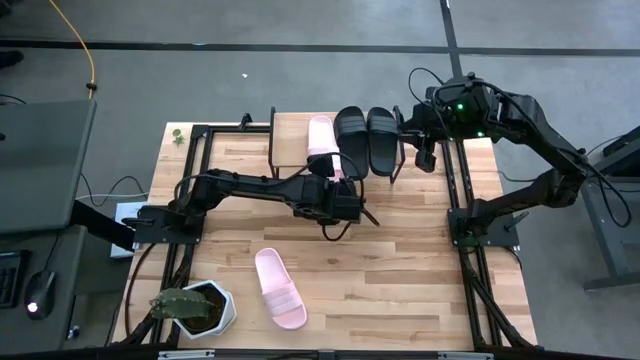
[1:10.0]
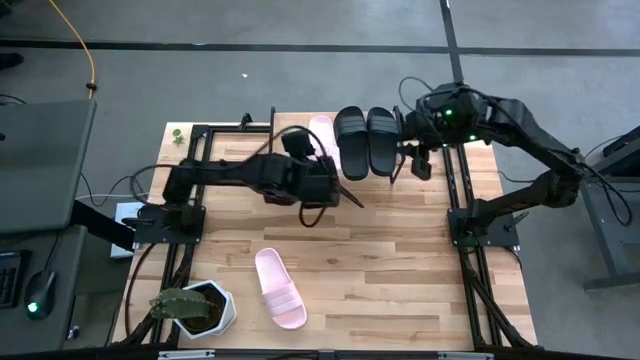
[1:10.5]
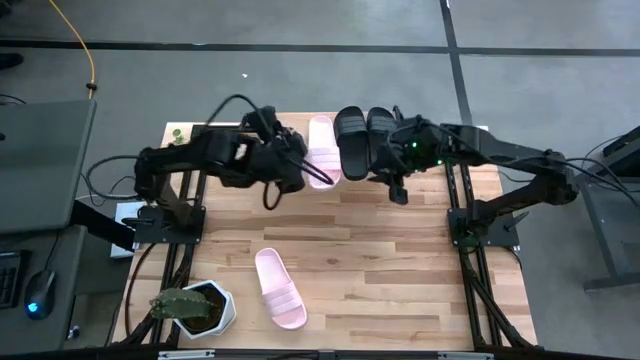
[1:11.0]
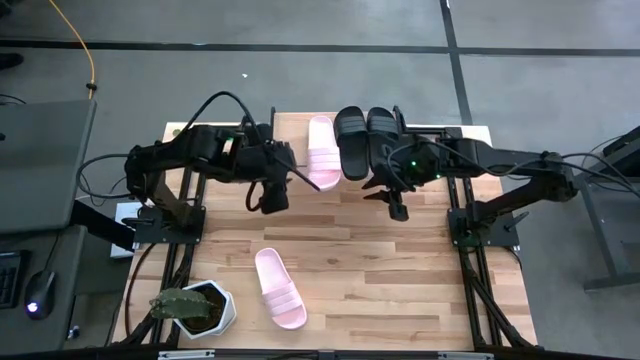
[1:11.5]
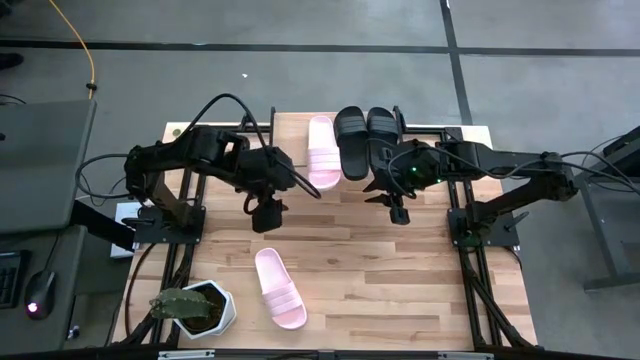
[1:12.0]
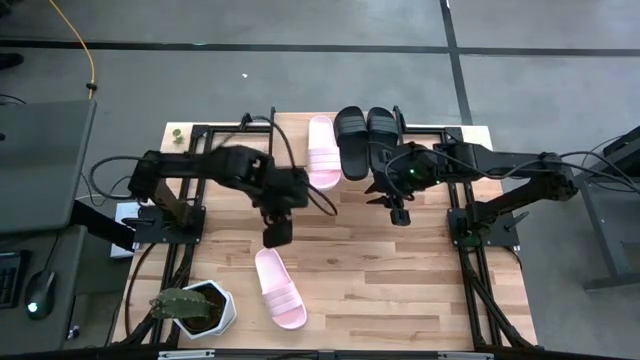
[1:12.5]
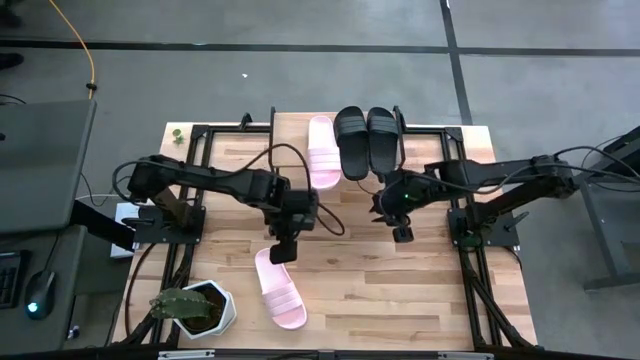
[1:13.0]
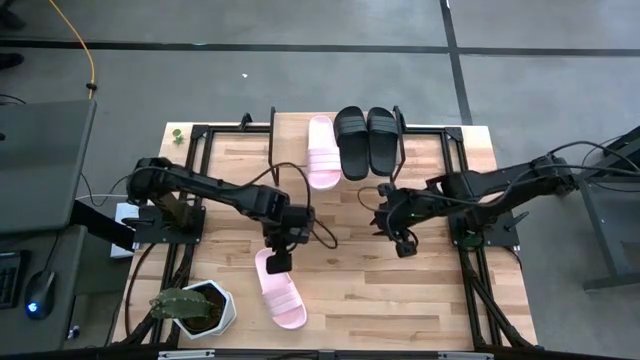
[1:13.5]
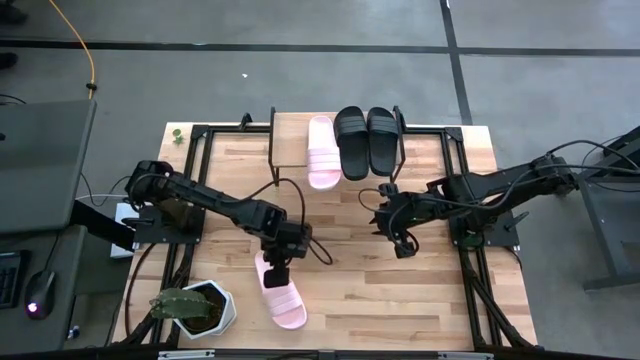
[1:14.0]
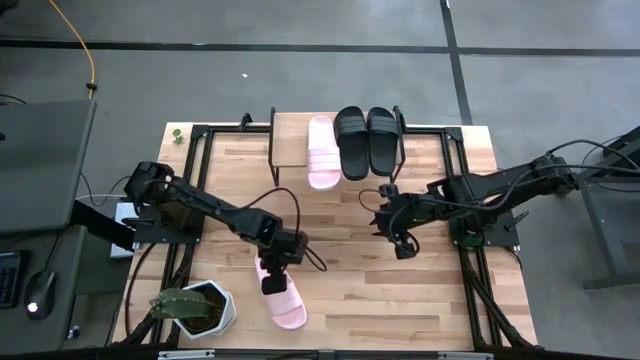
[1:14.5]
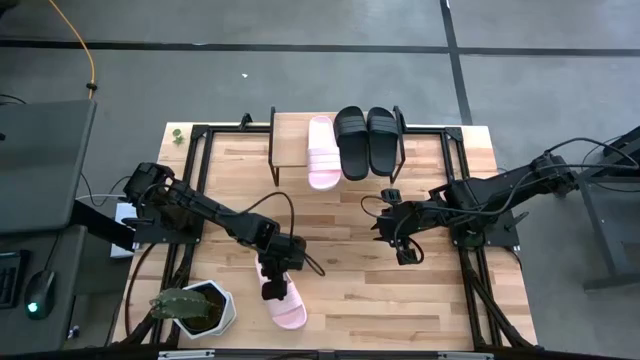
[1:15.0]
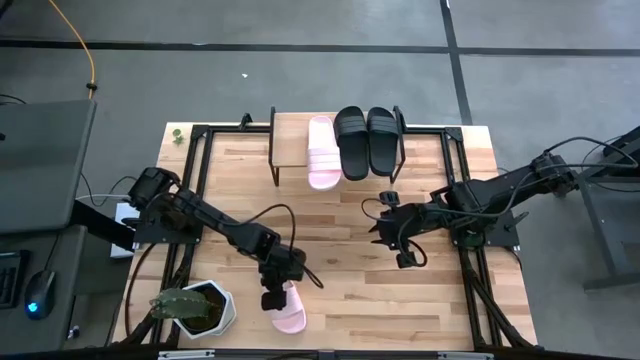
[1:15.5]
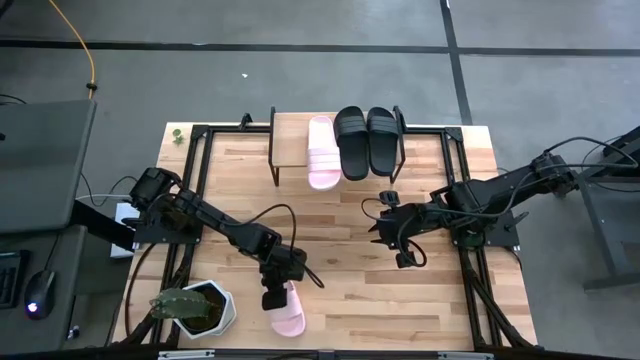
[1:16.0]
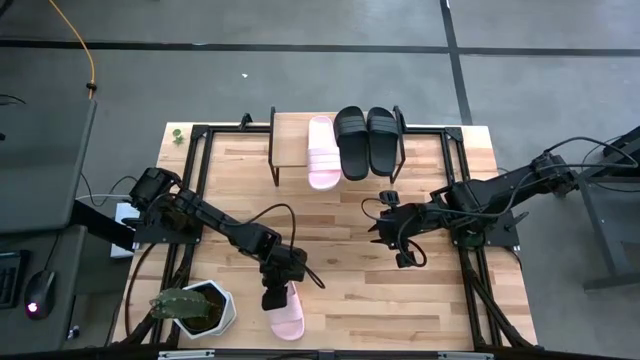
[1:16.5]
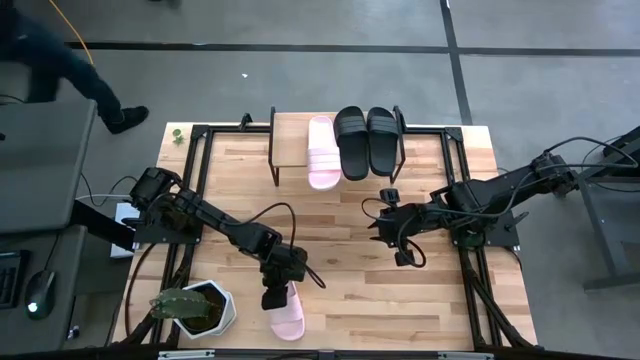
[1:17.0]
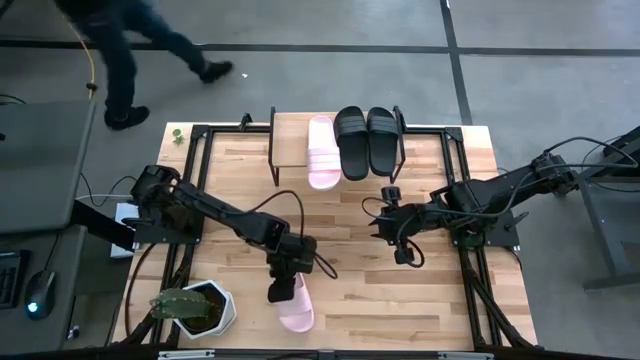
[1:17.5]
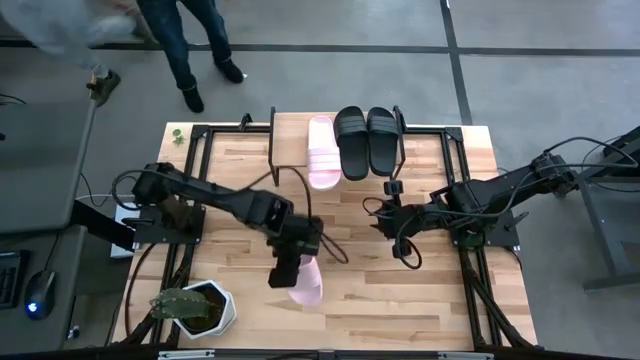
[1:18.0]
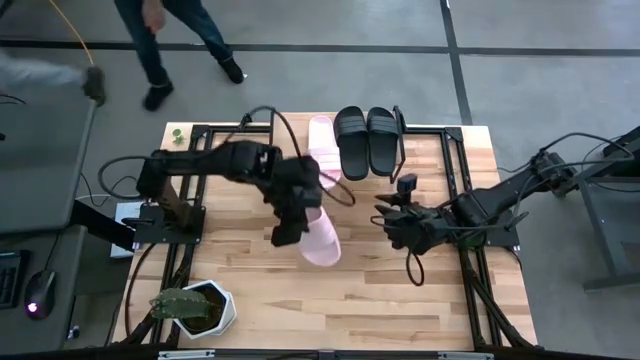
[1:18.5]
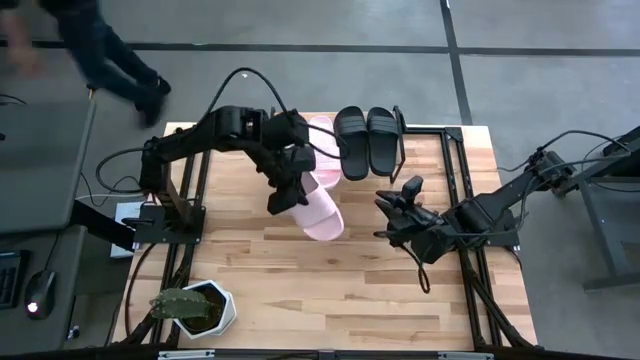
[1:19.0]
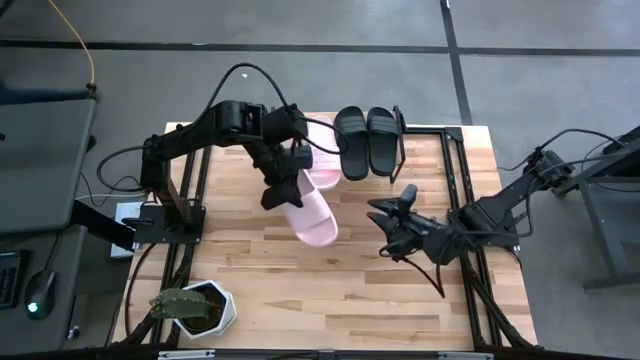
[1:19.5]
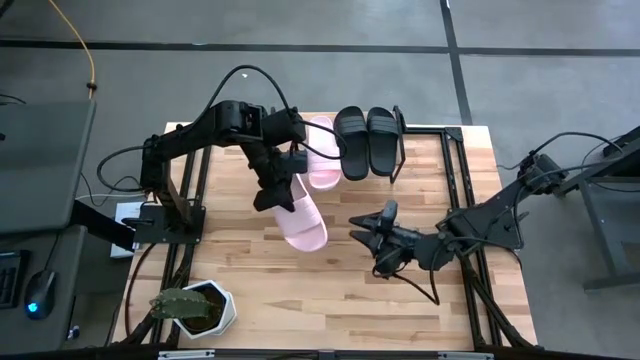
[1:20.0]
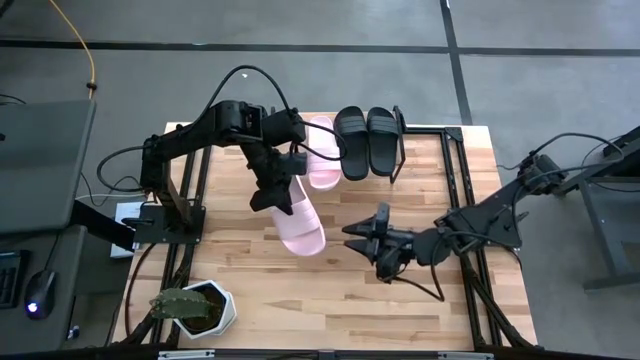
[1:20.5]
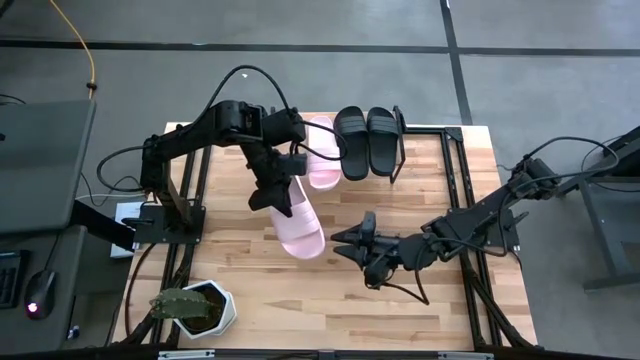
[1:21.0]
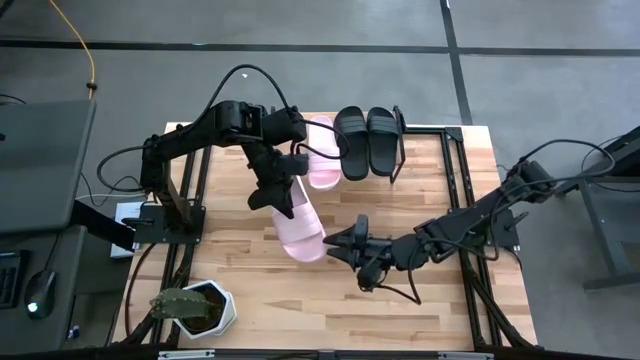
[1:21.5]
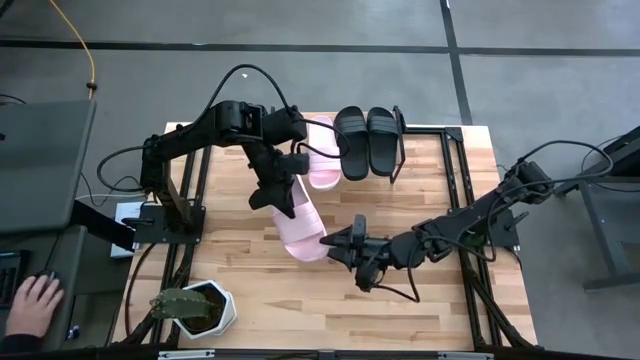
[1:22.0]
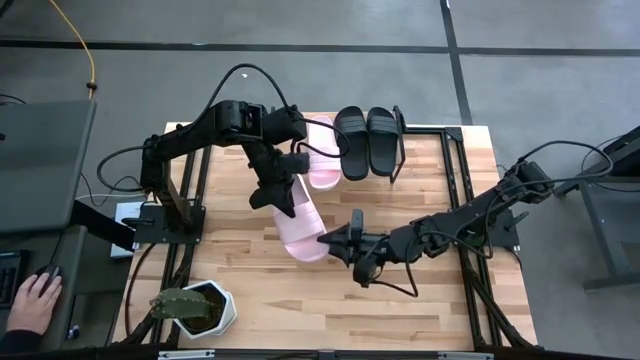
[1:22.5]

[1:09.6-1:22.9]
Task: Pick and place slides into the shelf
Put the pink slide on the shelf aligned with the other pink slide

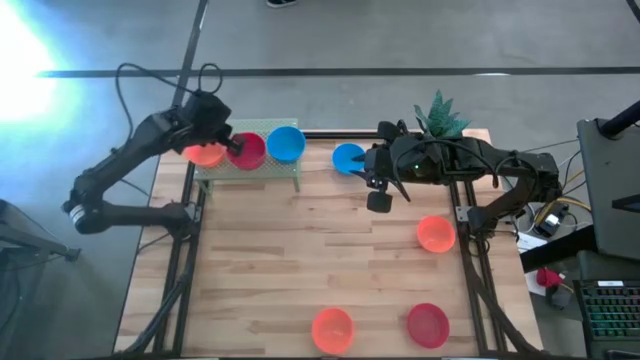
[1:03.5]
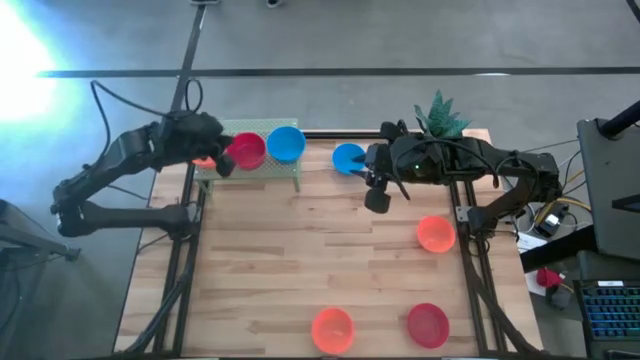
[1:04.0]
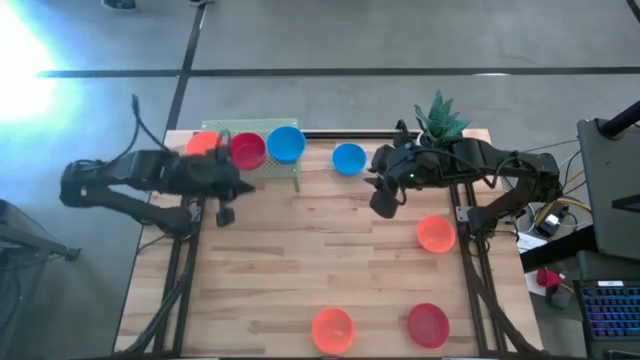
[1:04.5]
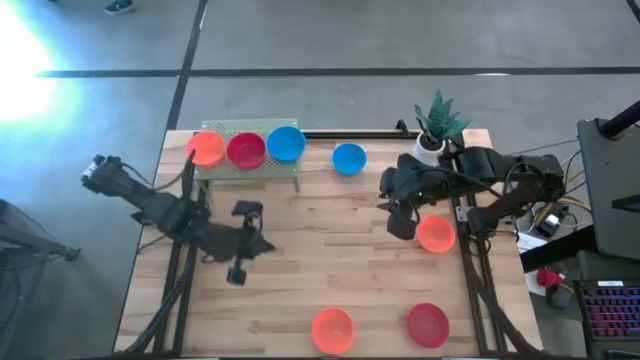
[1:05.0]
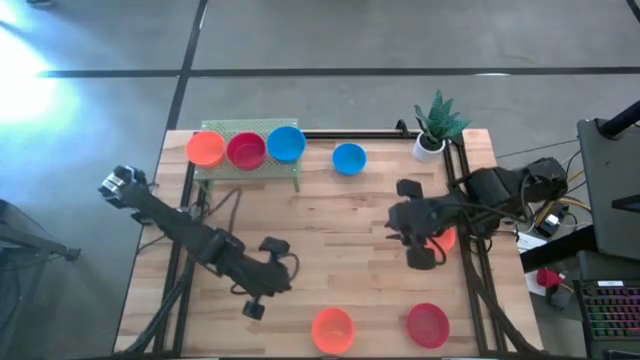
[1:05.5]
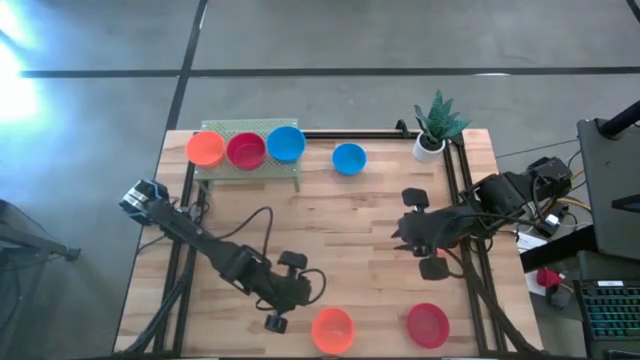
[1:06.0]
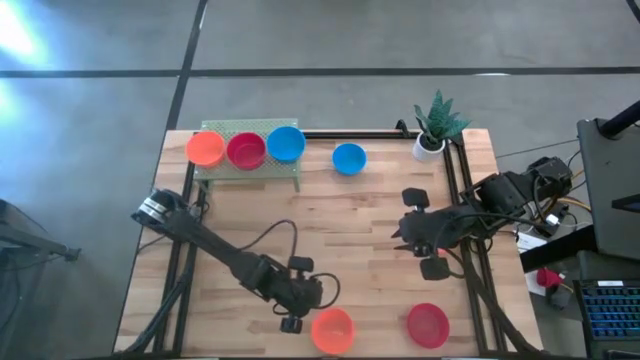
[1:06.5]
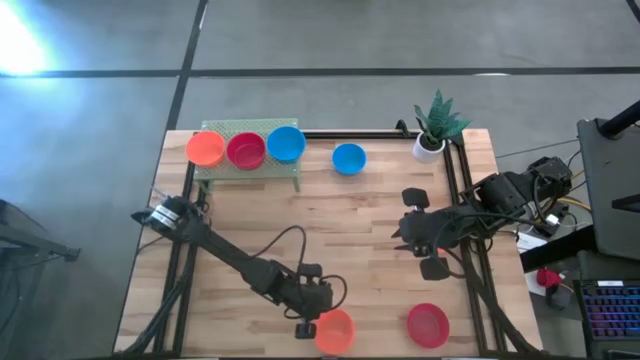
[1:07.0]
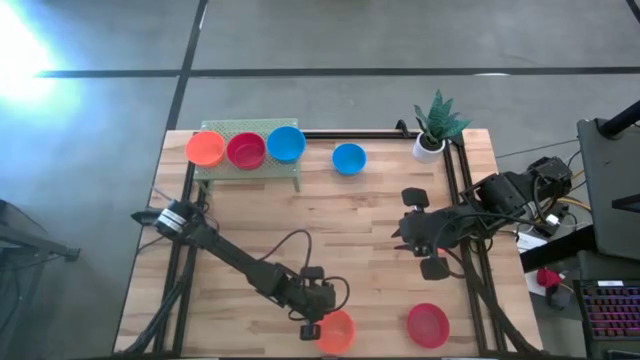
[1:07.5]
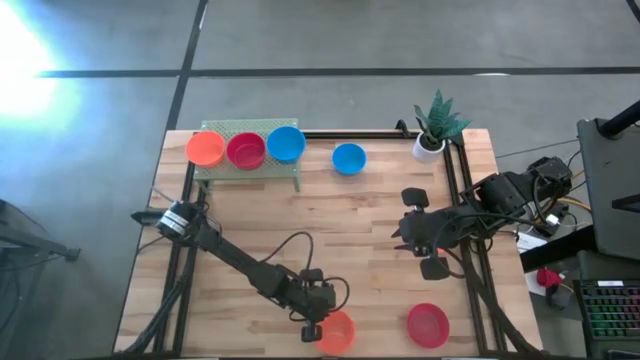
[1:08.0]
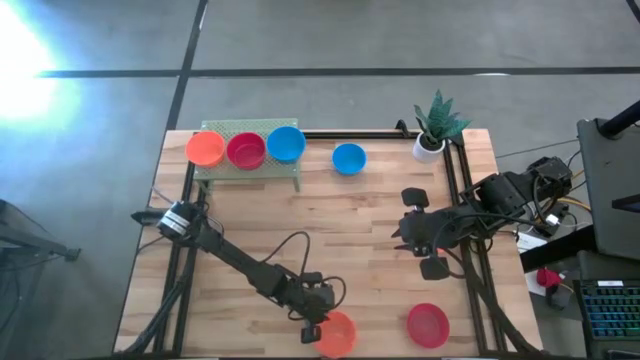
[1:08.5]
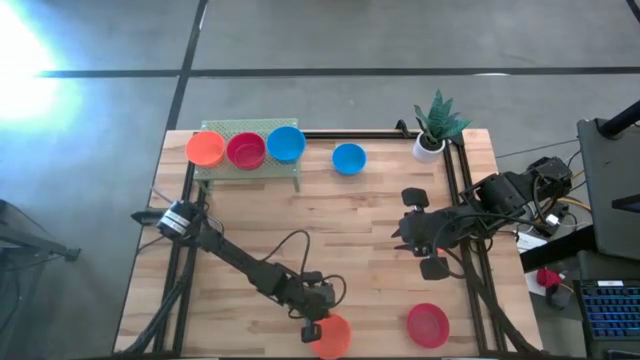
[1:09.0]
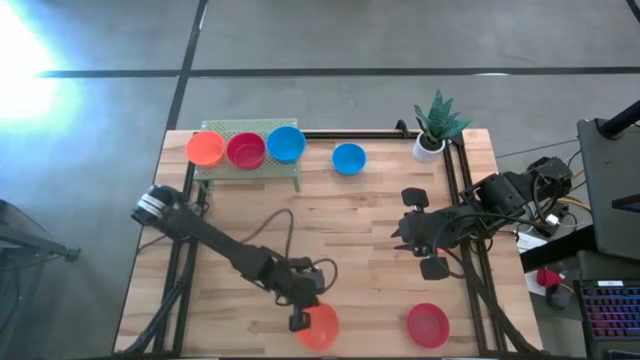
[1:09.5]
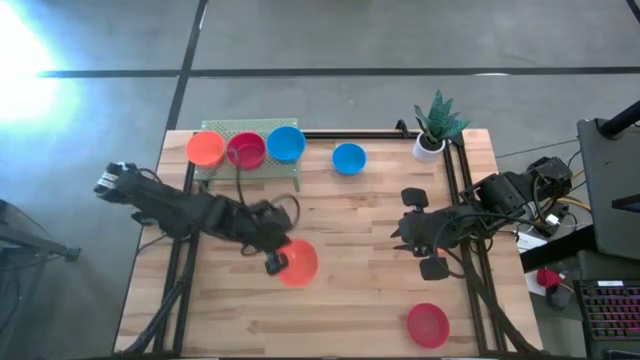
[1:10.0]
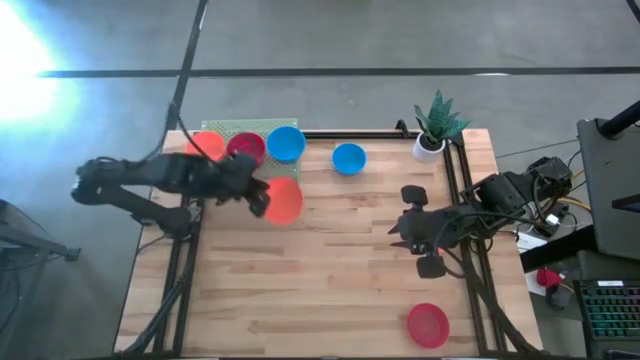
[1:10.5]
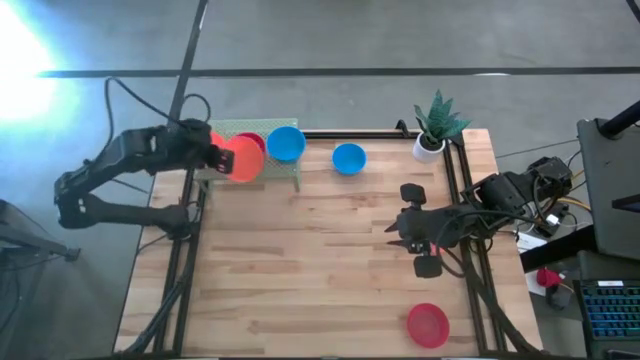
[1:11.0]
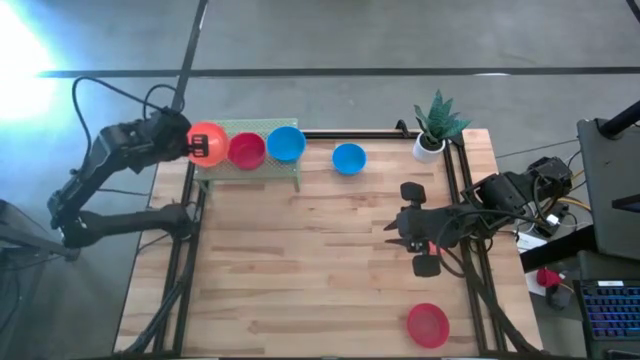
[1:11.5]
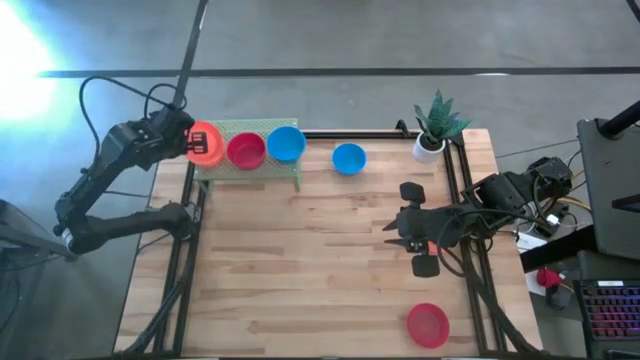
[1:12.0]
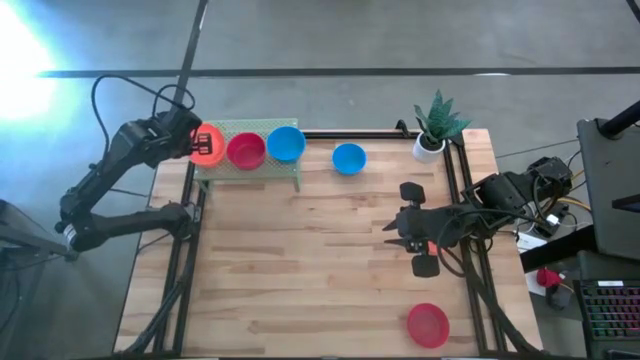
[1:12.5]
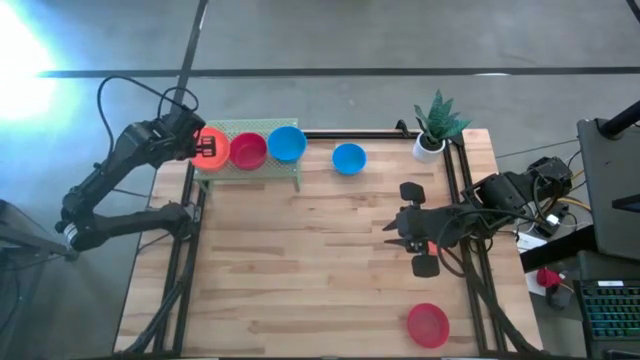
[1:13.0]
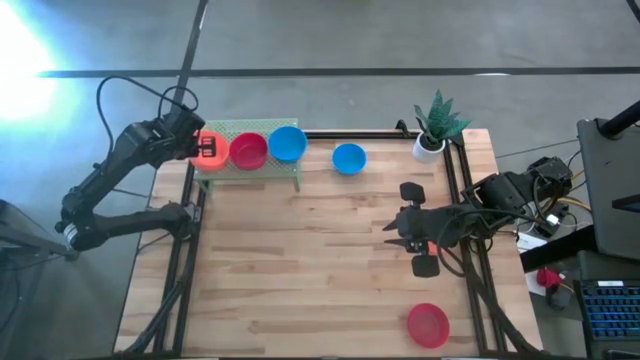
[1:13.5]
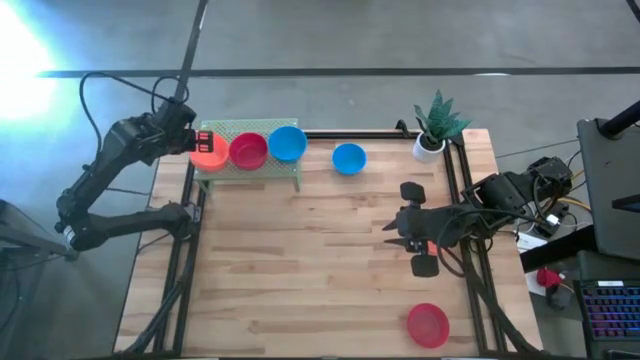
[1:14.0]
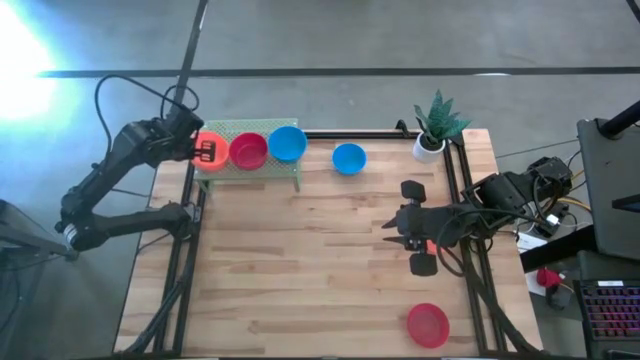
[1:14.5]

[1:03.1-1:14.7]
Task: Pick & Place Mini bowls
Stack the bottom orange bowl on top of the other orange bowl on the shelf
